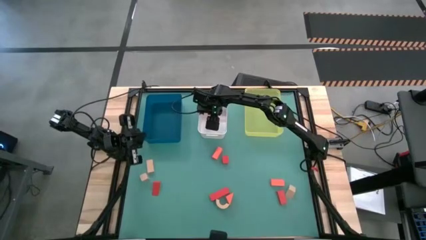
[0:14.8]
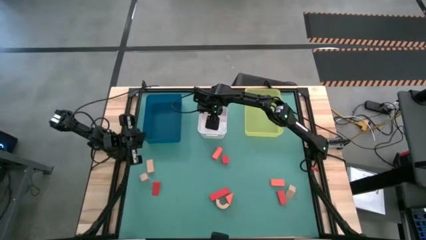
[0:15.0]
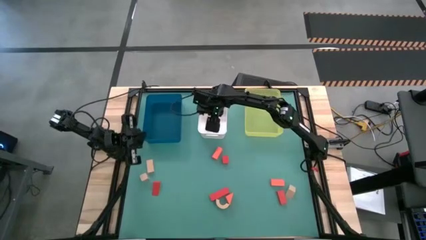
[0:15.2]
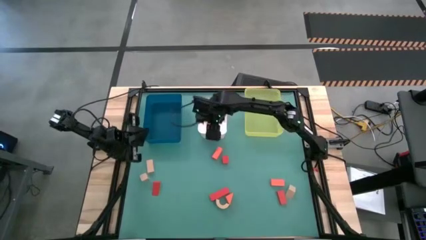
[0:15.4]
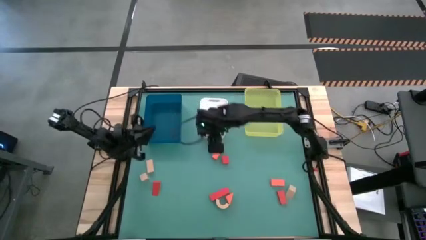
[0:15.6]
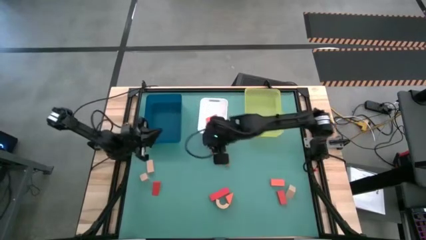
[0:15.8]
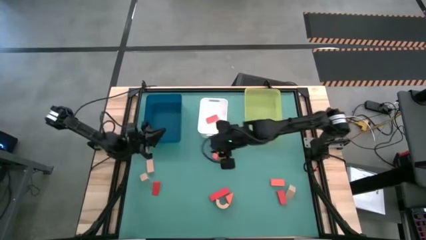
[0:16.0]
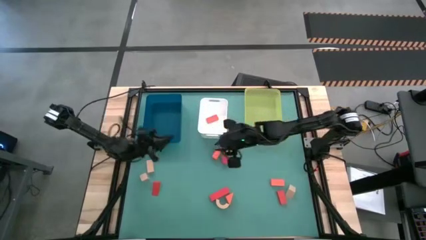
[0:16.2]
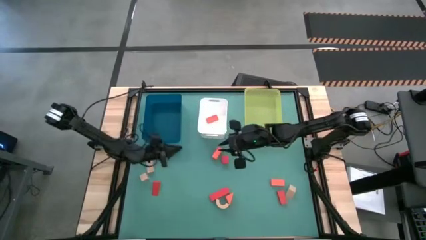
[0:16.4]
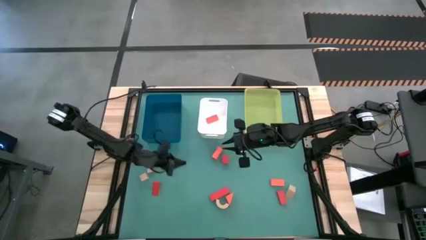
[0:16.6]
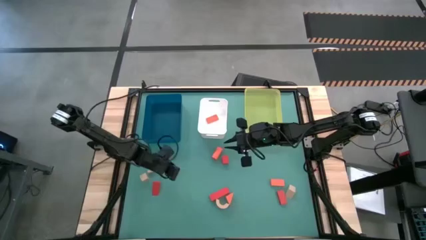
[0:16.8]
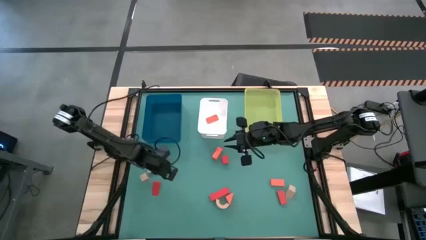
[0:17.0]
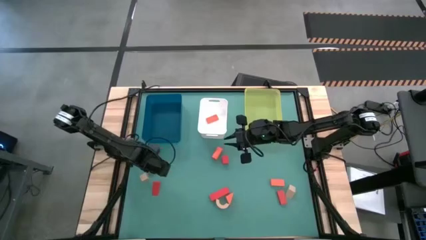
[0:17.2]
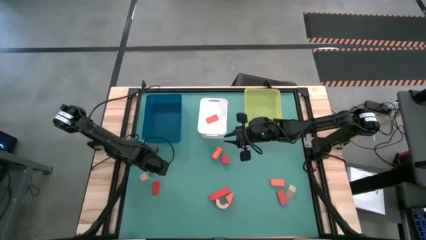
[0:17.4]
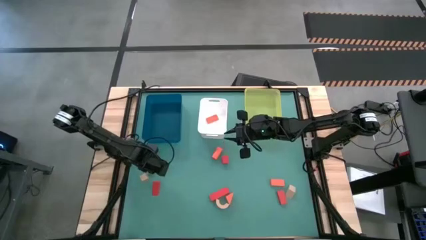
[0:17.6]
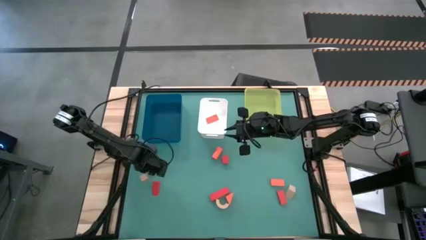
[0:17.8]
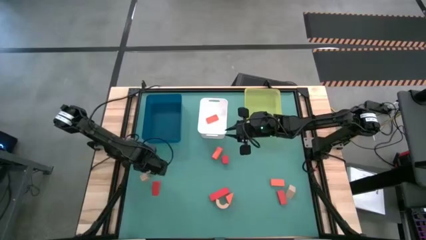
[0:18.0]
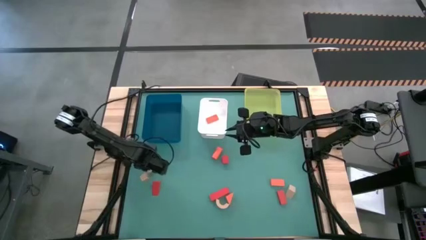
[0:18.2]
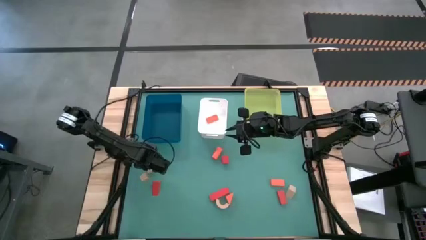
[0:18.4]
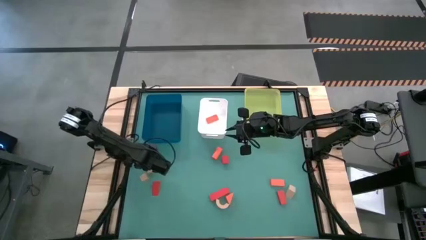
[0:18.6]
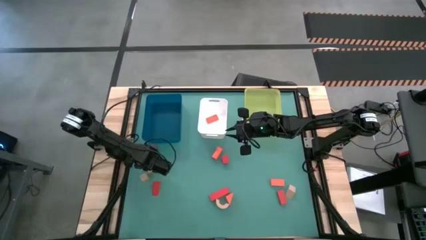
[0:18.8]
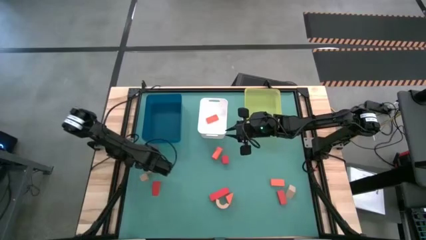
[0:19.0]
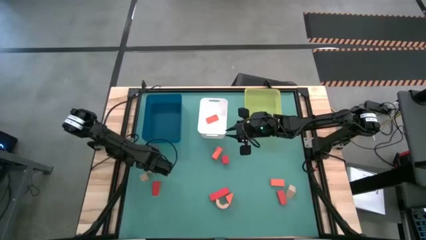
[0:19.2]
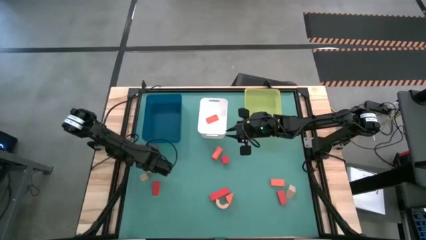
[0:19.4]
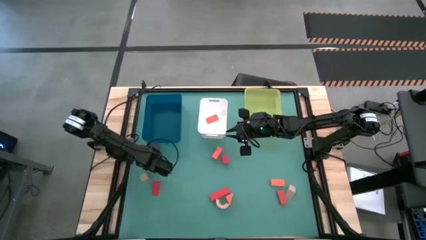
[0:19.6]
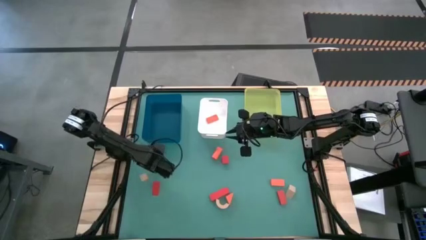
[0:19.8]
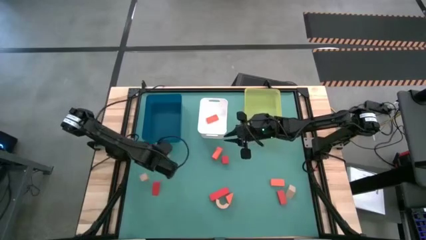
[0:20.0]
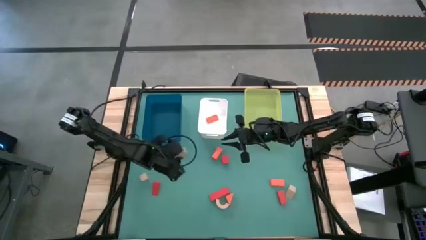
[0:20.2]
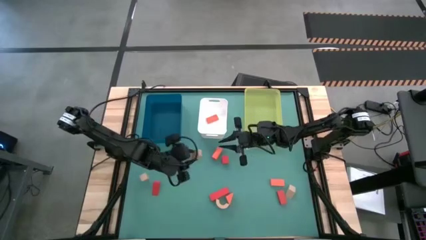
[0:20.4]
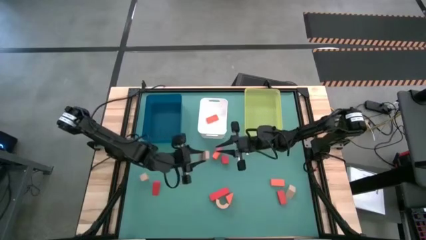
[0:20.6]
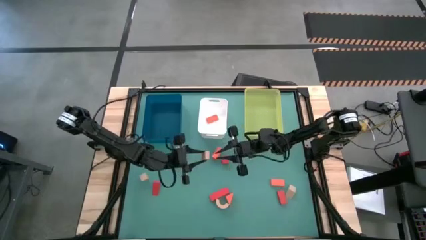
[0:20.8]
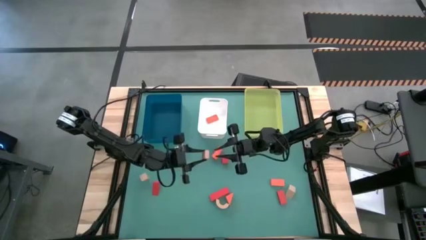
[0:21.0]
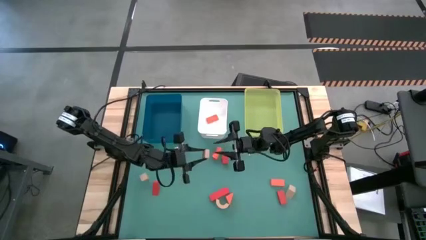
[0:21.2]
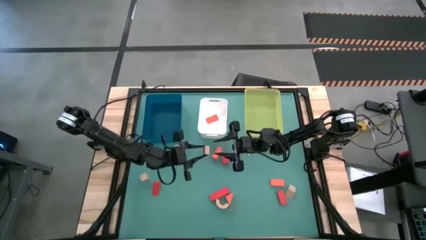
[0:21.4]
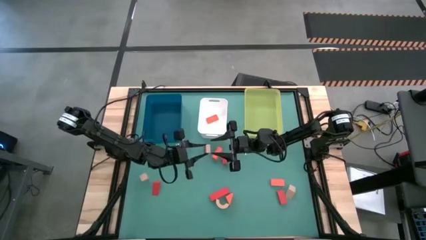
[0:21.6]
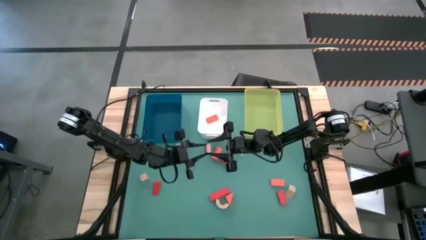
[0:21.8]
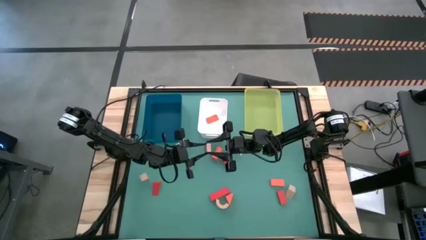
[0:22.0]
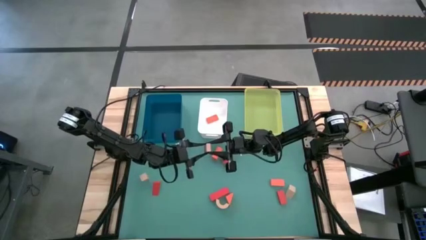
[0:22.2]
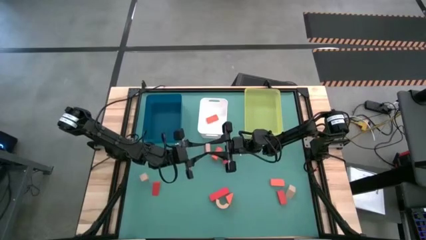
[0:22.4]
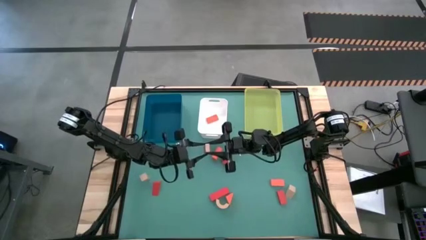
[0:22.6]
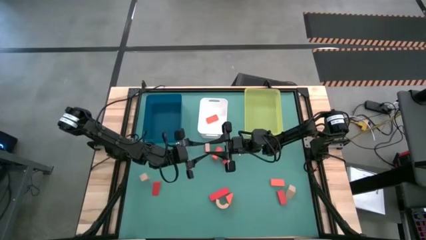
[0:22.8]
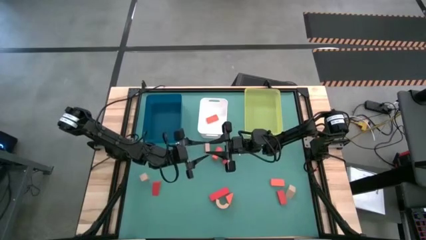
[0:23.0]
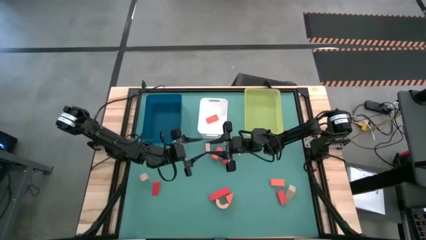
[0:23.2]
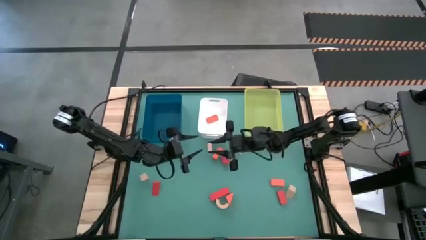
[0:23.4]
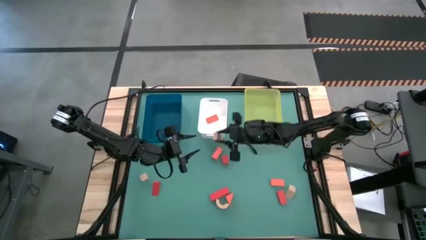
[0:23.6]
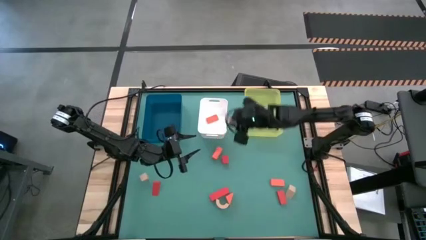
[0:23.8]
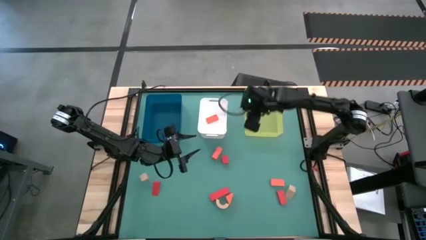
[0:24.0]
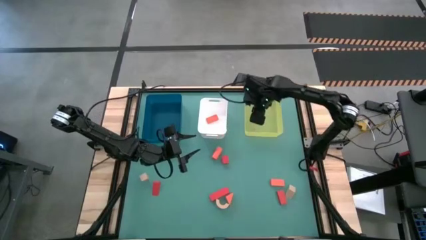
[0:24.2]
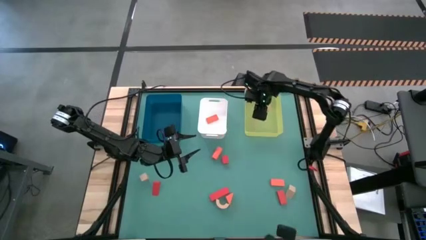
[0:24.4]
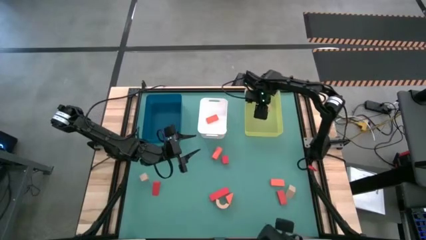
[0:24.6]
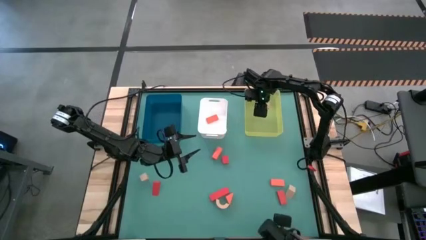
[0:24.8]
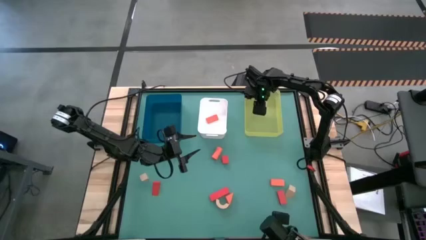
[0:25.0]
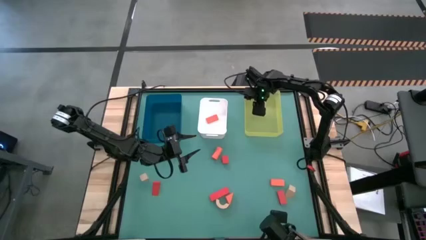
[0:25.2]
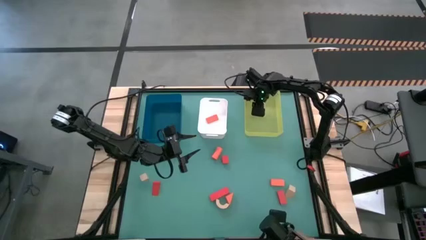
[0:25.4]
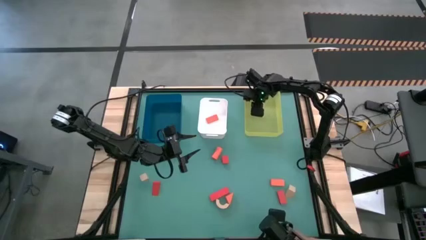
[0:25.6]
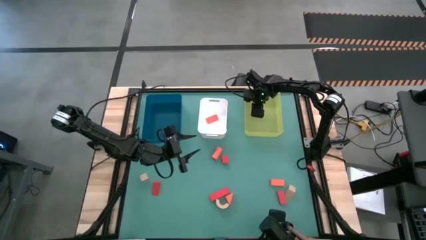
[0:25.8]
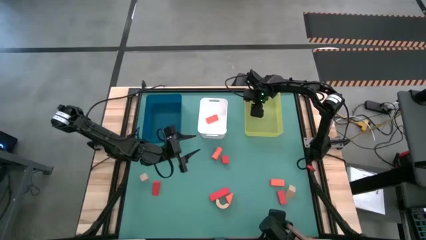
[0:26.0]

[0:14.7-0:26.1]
Task: Sort & place blocks by color
Put the top left light brown block into the yellow bin

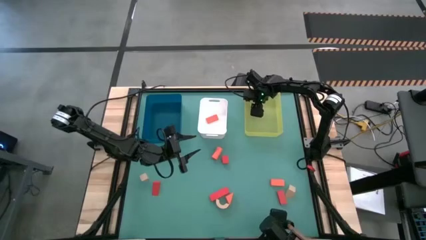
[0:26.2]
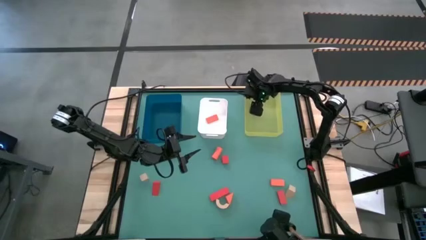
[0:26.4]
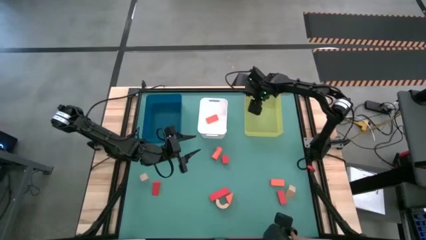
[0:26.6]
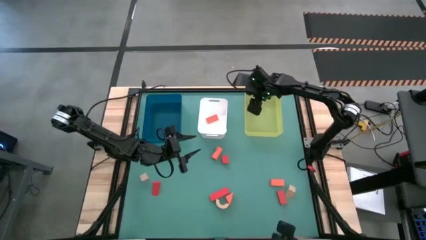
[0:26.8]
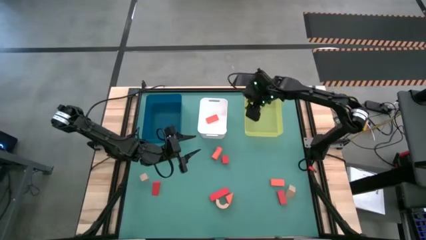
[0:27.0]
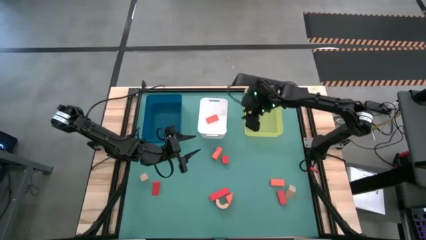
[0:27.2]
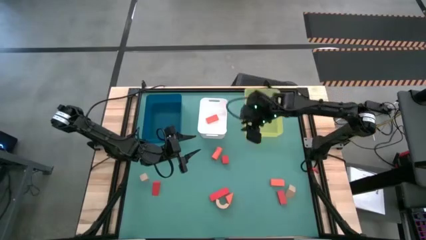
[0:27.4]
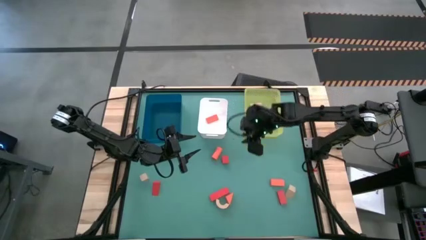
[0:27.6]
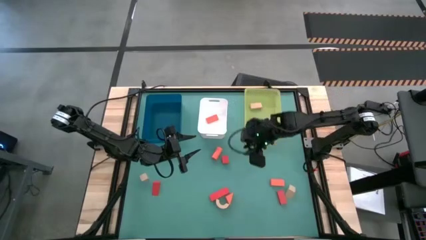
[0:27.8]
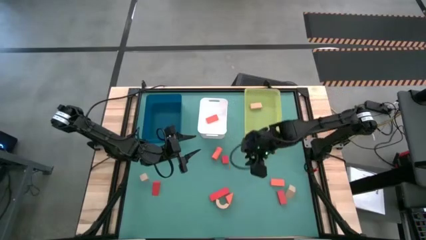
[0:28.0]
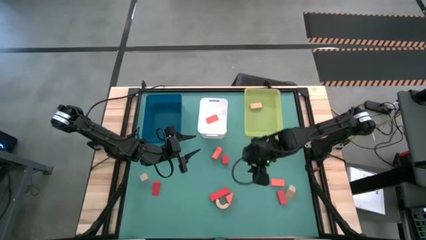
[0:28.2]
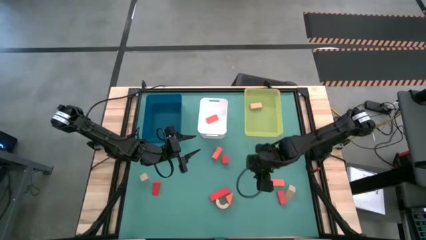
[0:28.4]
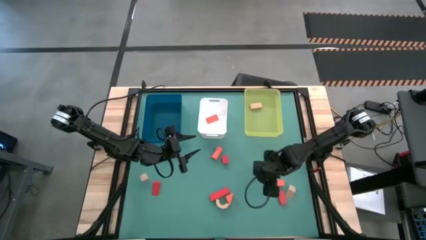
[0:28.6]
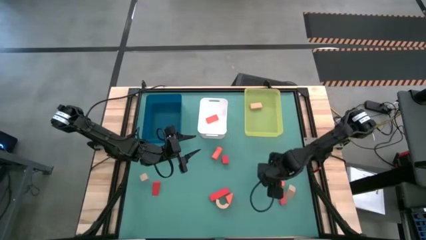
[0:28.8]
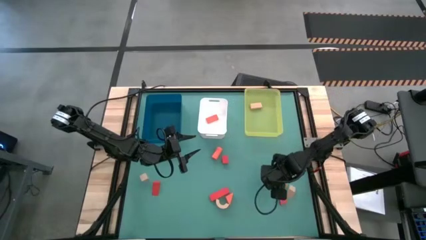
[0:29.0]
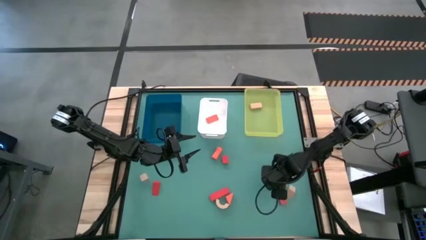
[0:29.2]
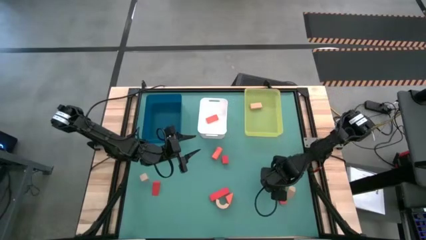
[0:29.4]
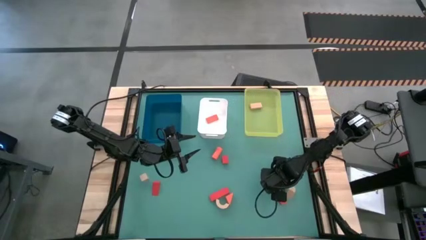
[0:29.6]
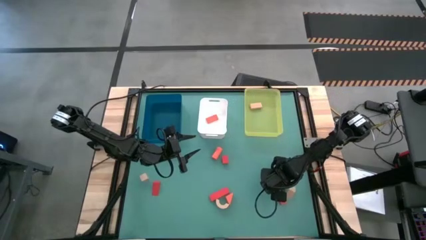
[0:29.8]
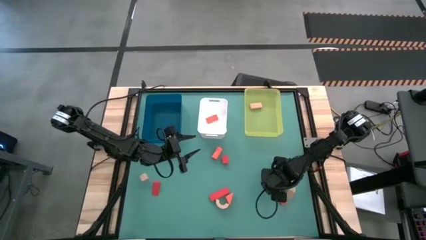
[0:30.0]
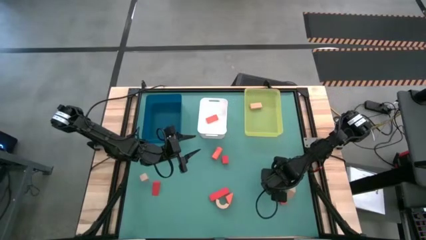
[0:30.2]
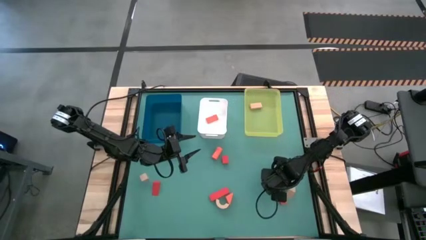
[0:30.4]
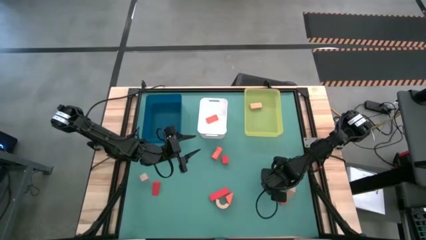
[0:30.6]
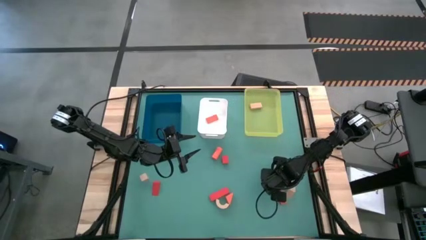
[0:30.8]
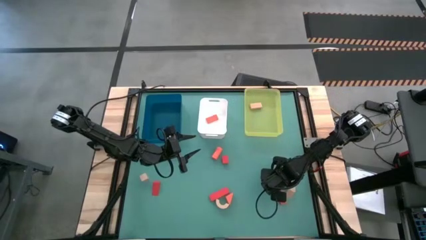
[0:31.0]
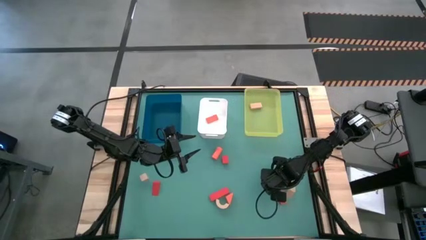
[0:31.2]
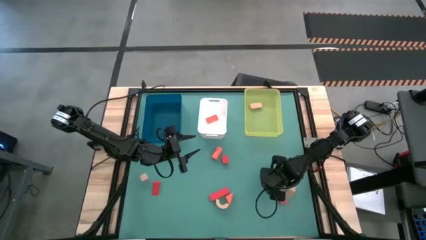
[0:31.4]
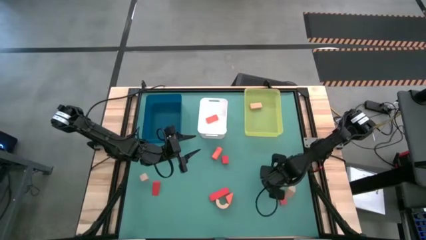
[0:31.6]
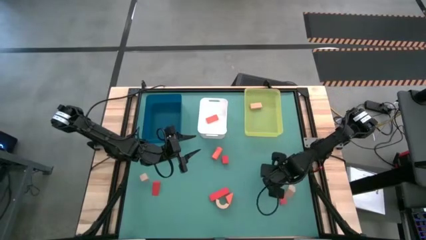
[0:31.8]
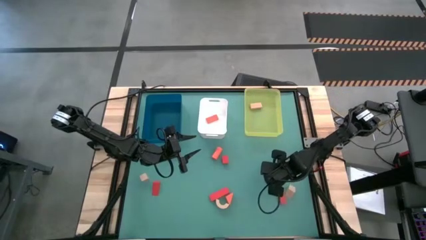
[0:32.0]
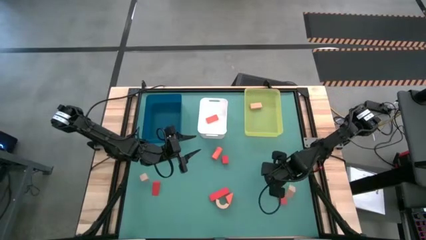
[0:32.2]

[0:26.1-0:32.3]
Put the bottom right orange block into the white bin
